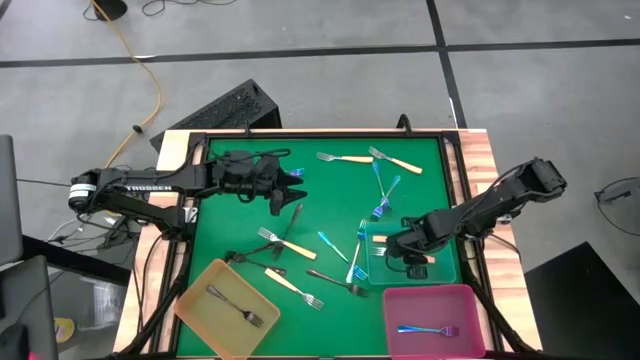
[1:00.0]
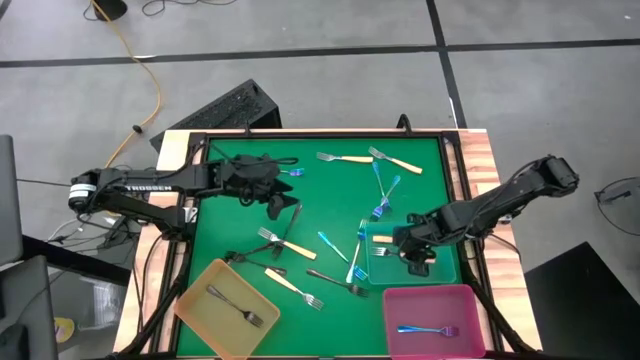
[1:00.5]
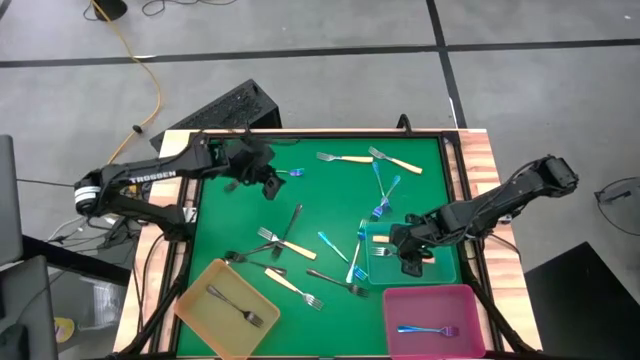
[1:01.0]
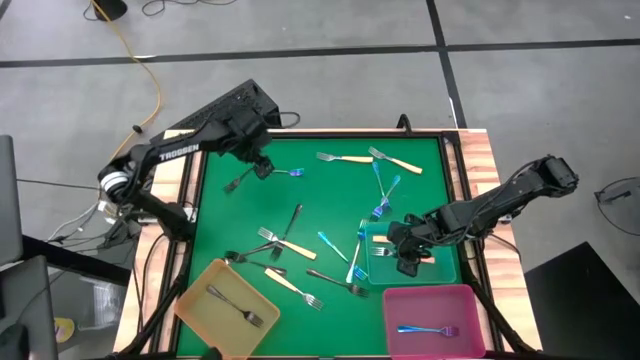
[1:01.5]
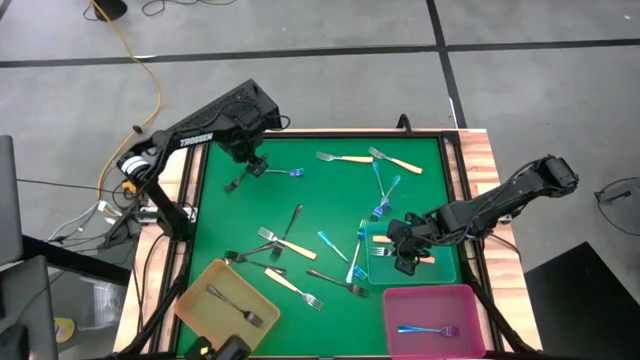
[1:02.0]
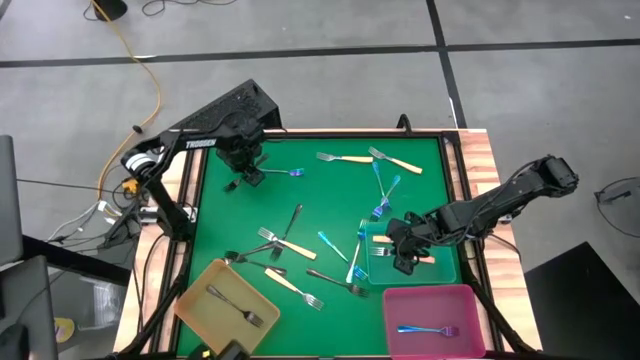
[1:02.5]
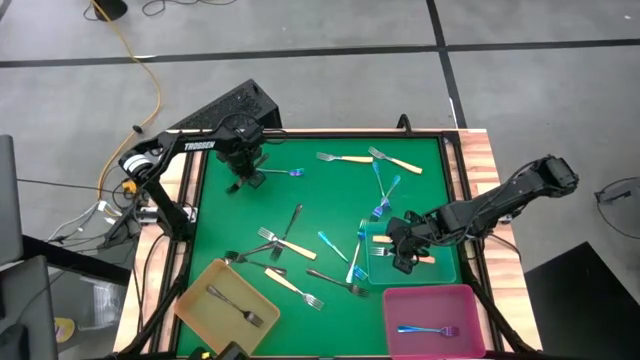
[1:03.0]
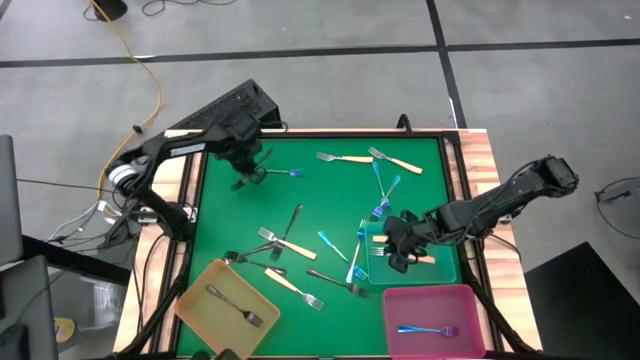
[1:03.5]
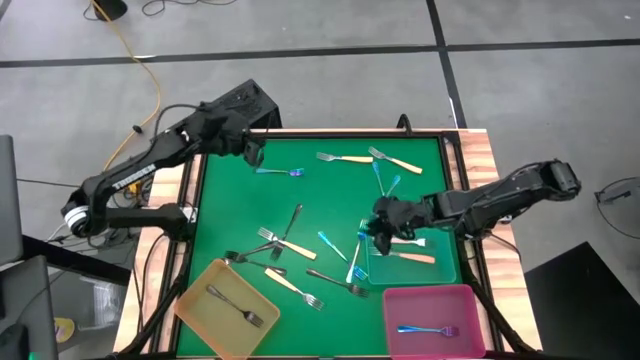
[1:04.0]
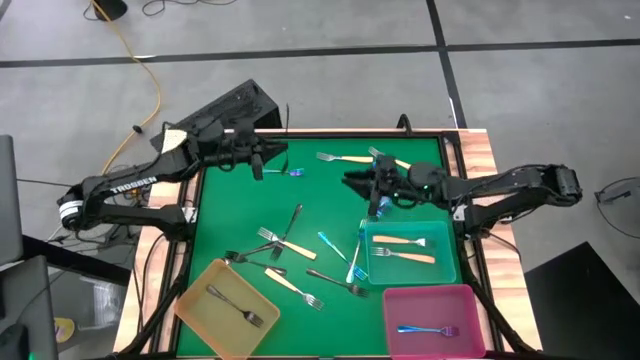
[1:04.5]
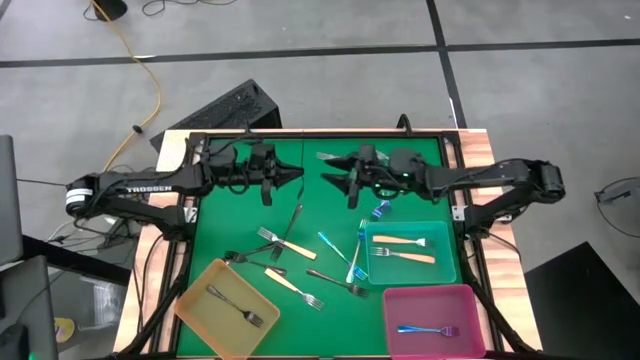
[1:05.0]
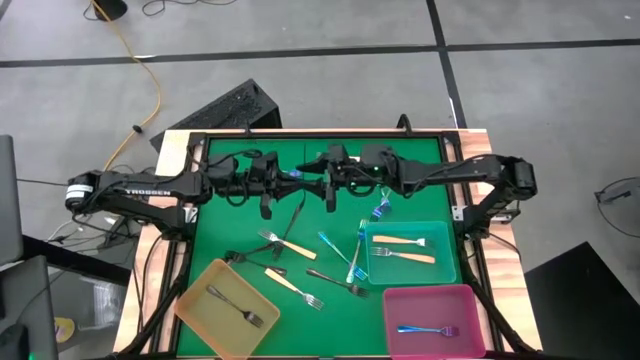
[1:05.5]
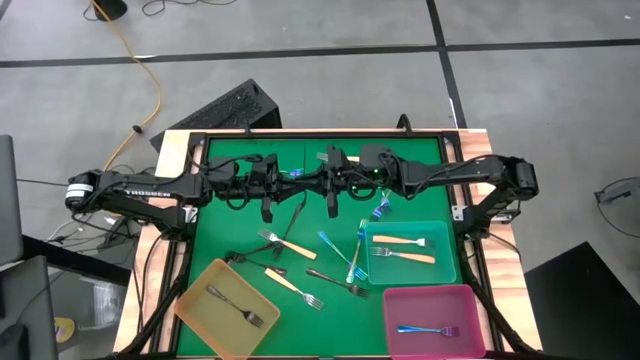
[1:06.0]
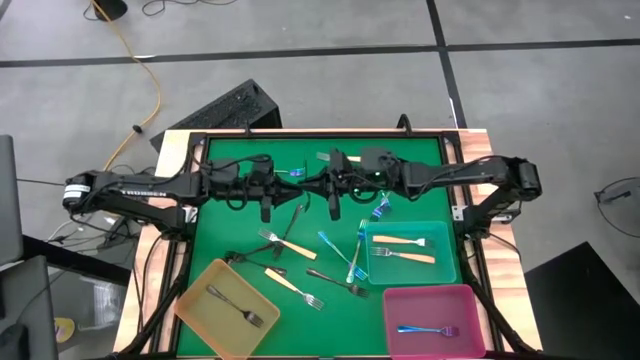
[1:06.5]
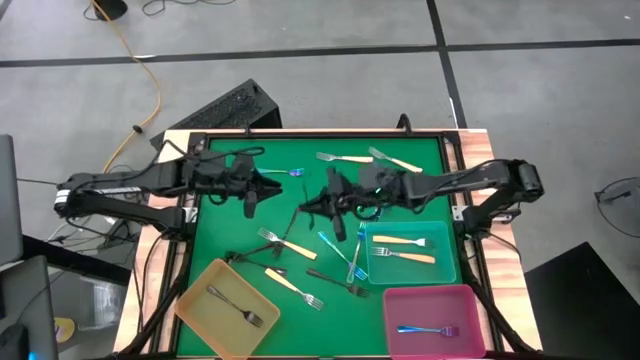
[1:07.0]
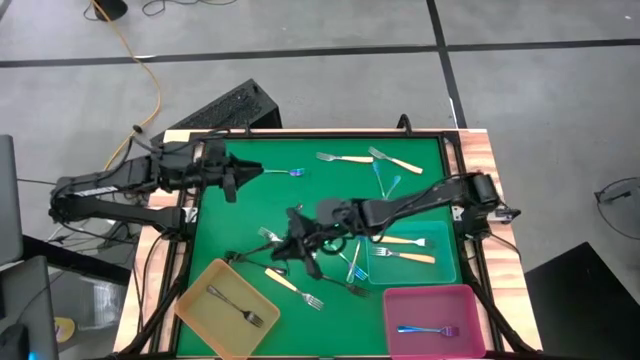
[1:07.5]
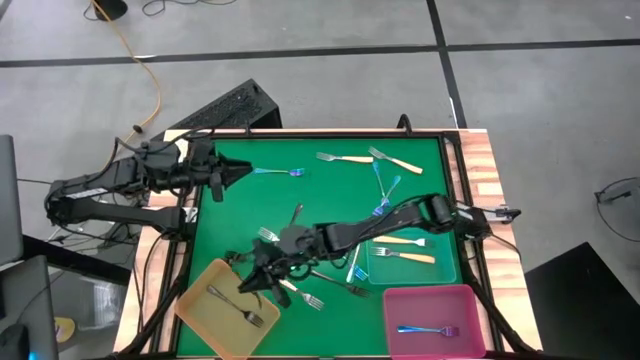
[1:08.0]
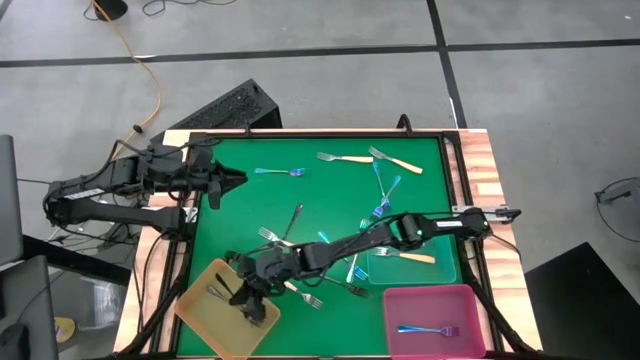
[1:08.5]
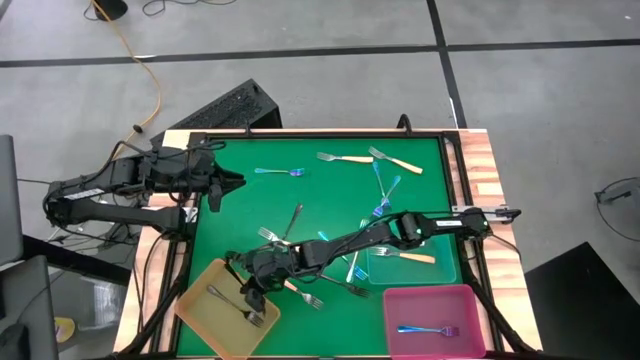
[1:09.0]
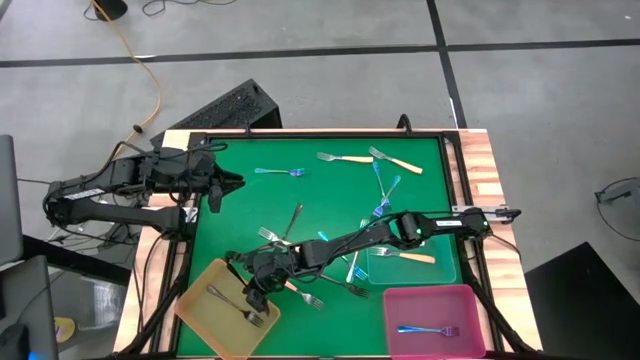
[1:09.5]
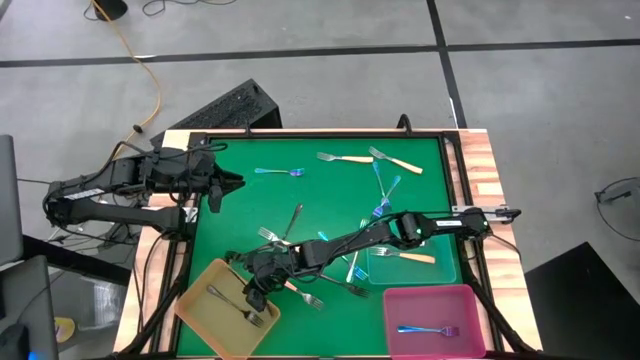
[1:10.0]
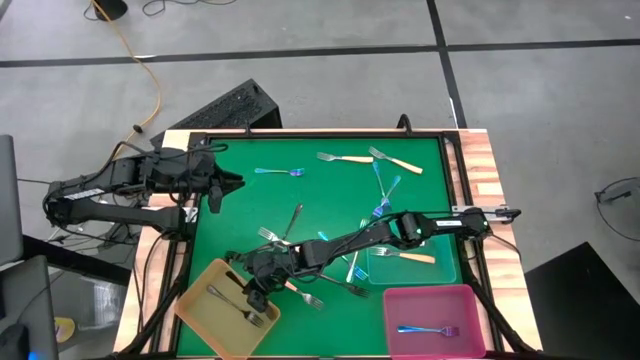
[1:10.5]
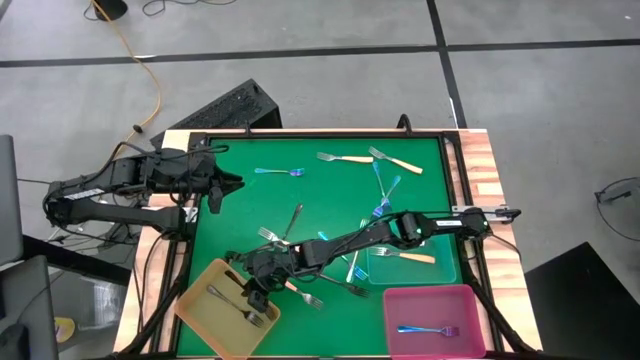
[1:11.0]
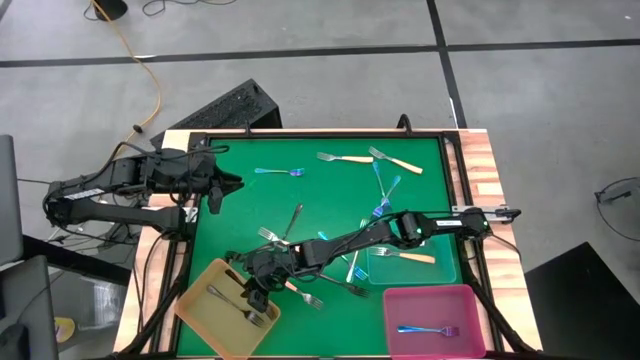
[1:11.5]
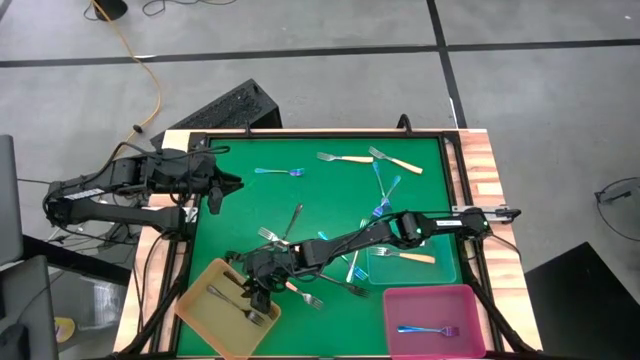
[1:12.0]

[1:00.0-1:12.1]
Task: Sort silverware by color (type)
Put the black fork into the orange bin

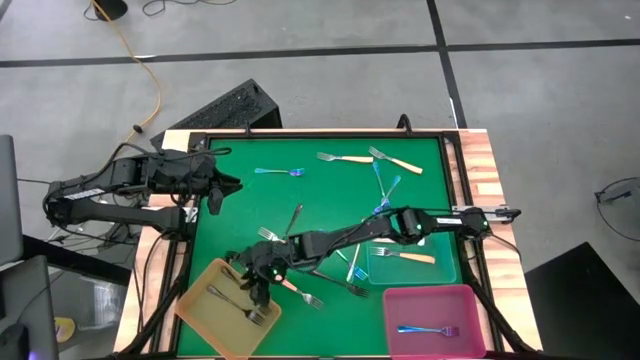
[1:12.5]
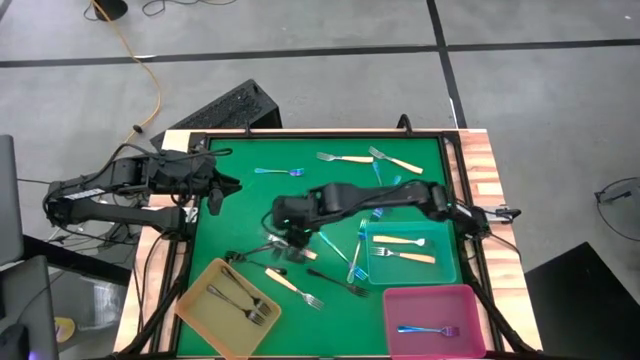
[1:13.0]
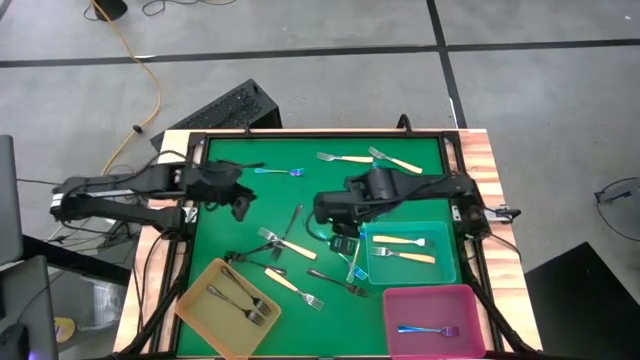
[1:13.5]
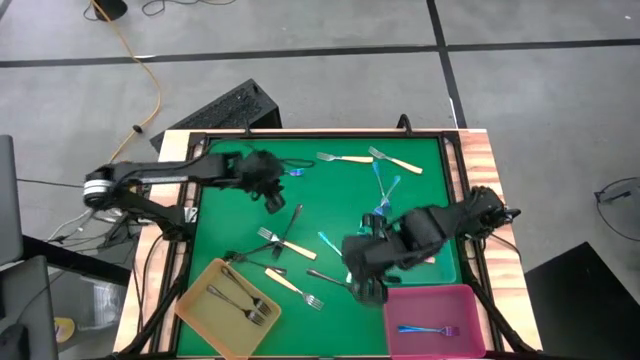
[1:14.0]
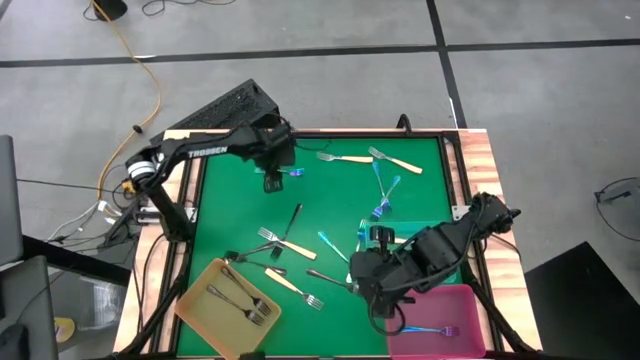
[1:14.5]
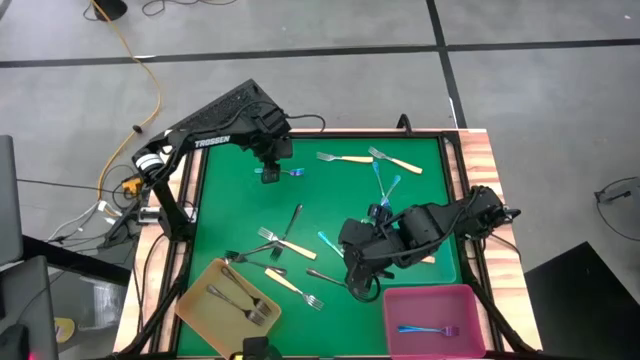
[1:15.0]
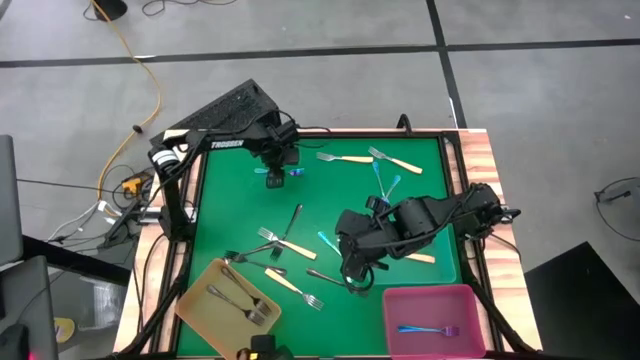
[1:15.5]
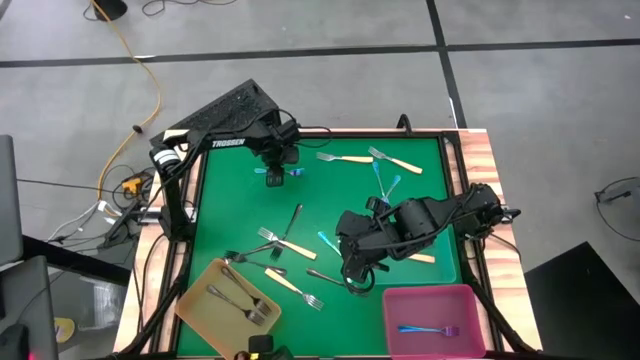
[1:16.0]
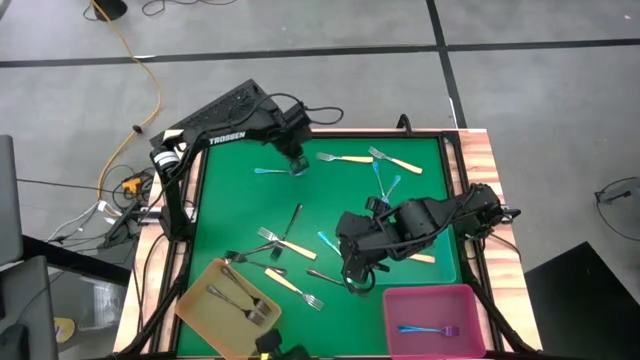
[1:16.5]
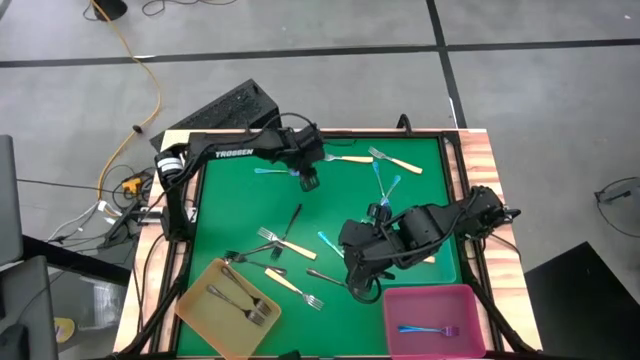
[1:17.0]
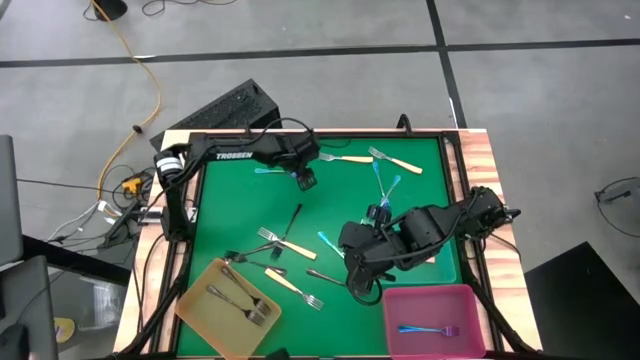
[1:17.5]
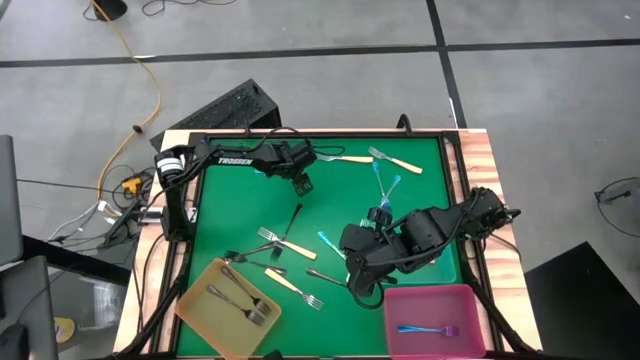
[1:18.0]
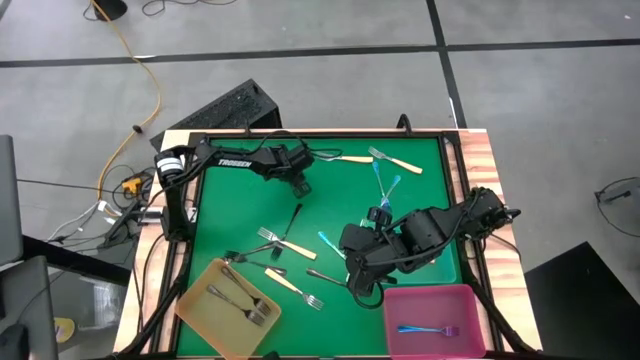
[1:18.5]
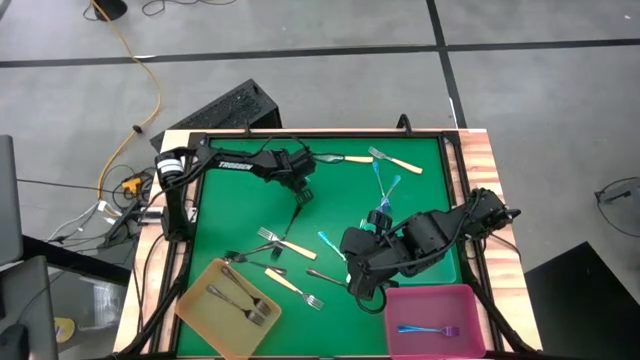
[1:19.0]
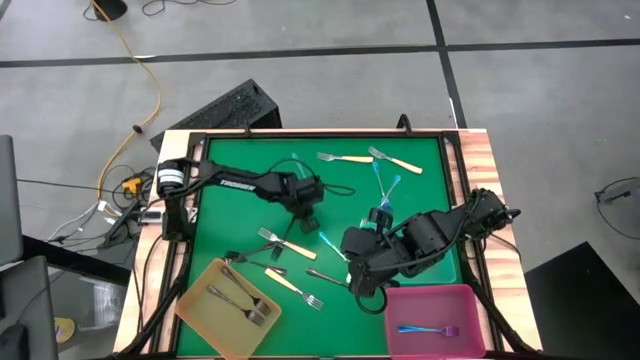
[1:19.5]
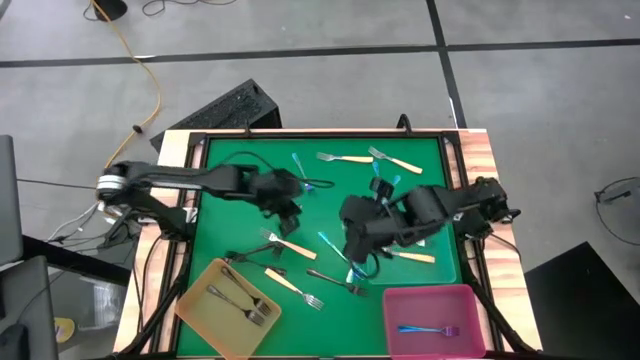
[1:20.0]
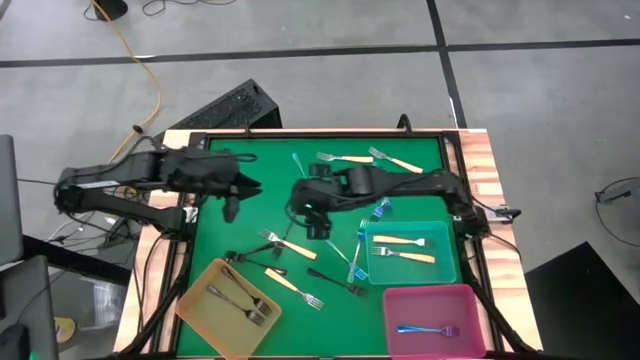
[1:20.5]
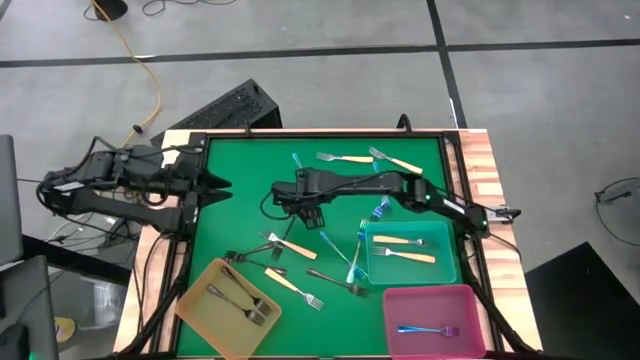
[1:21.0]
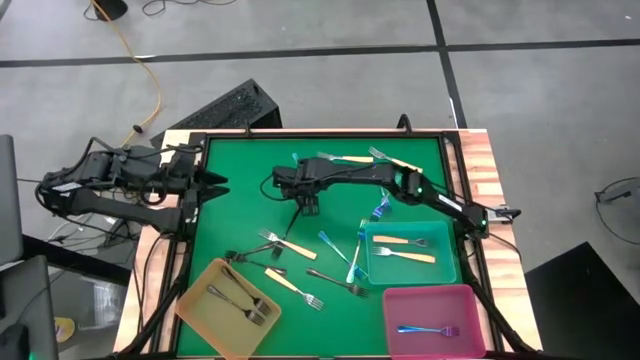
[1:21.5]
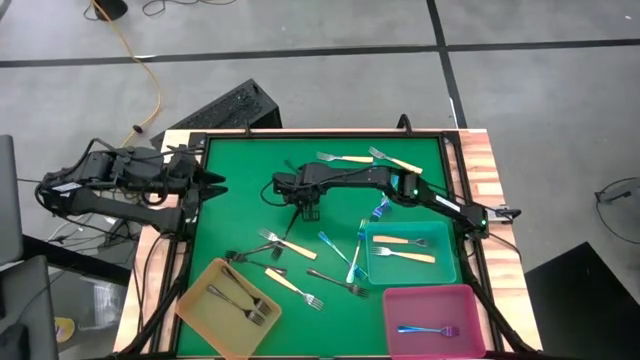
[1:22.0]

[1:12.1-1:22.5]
Put the purple fork into the pink bin
